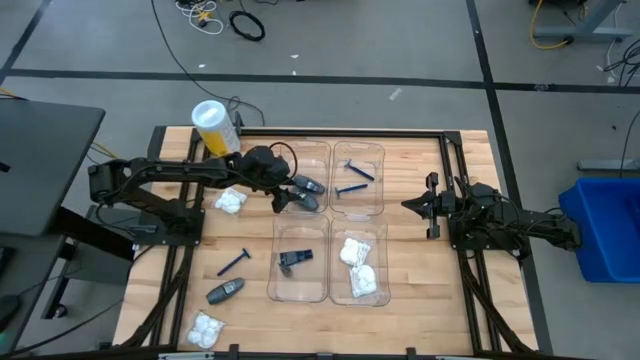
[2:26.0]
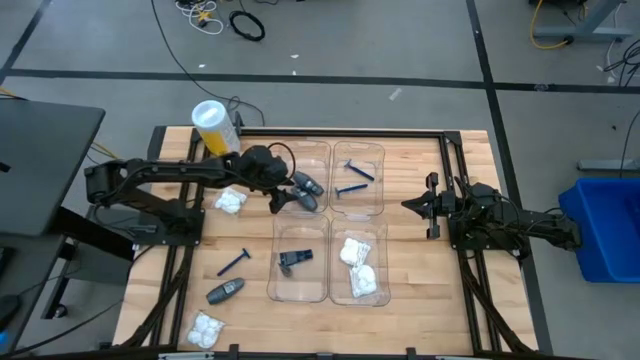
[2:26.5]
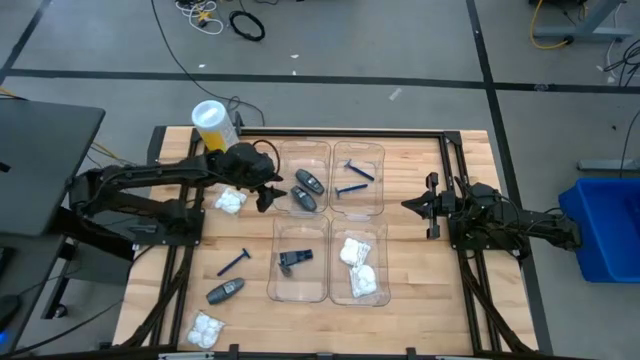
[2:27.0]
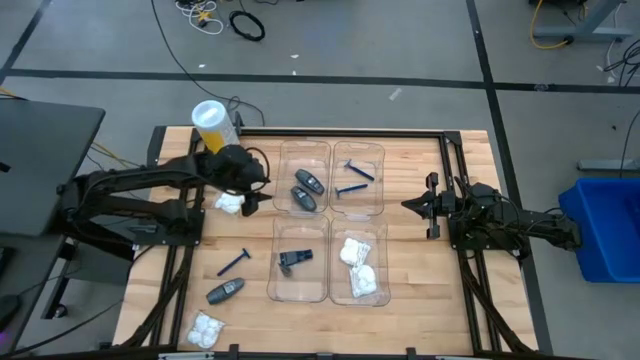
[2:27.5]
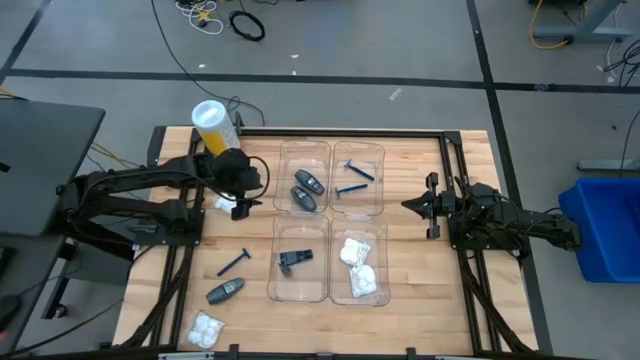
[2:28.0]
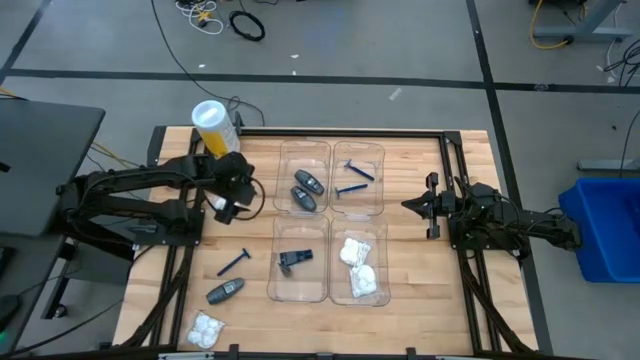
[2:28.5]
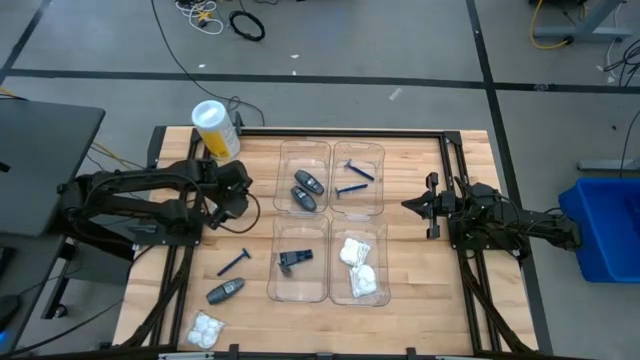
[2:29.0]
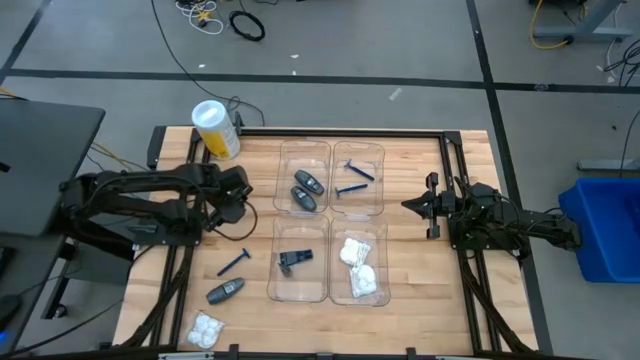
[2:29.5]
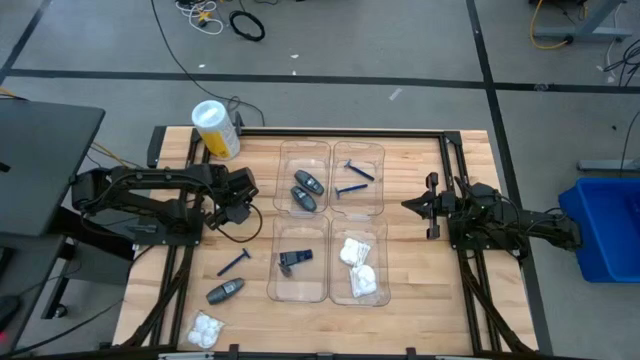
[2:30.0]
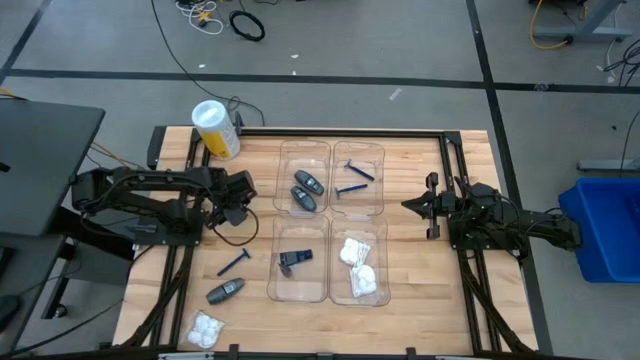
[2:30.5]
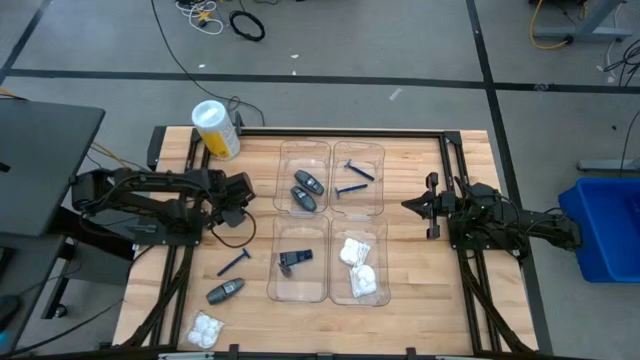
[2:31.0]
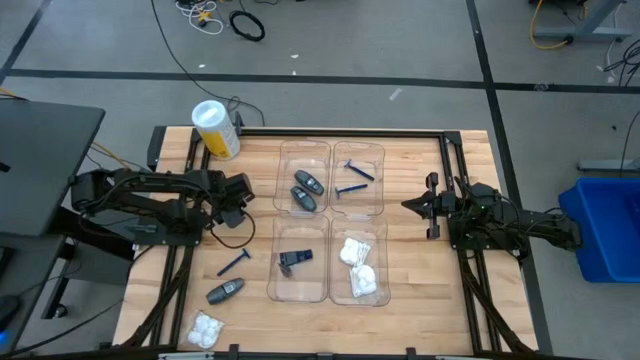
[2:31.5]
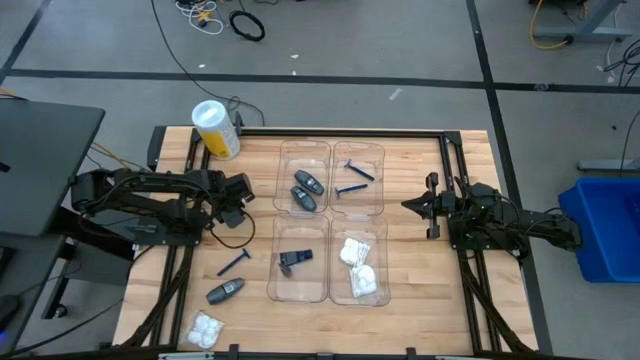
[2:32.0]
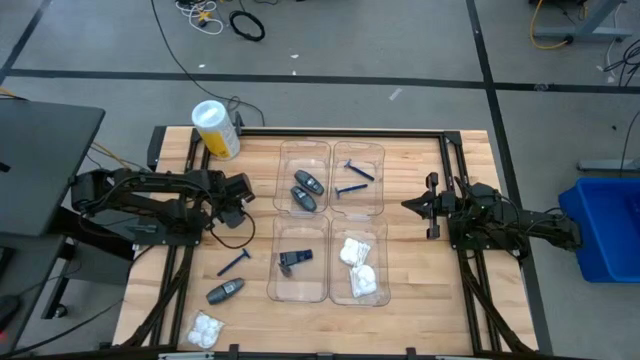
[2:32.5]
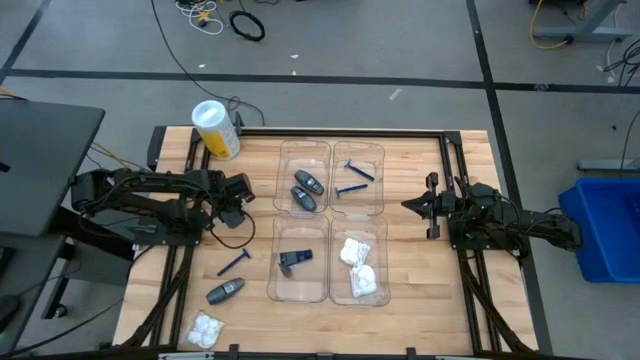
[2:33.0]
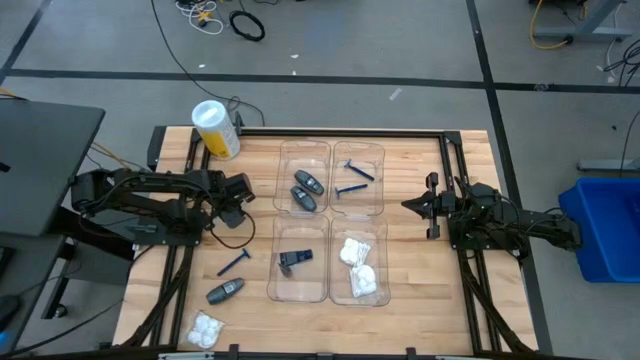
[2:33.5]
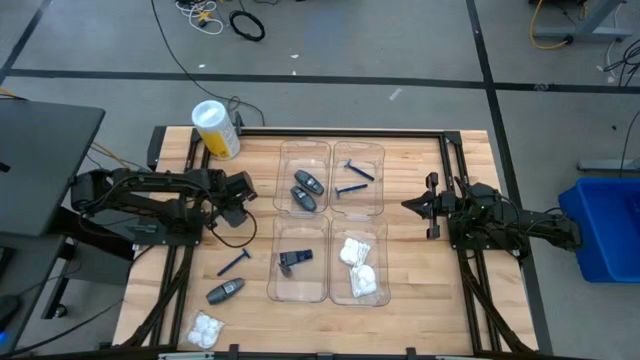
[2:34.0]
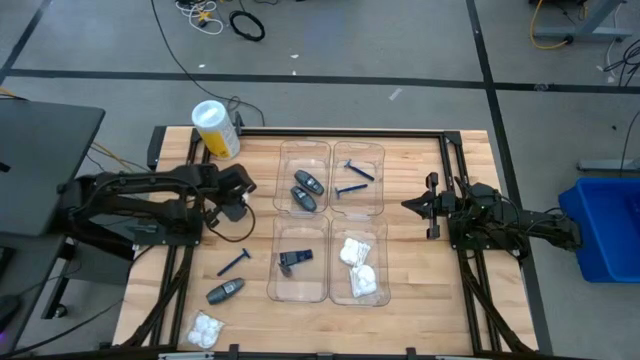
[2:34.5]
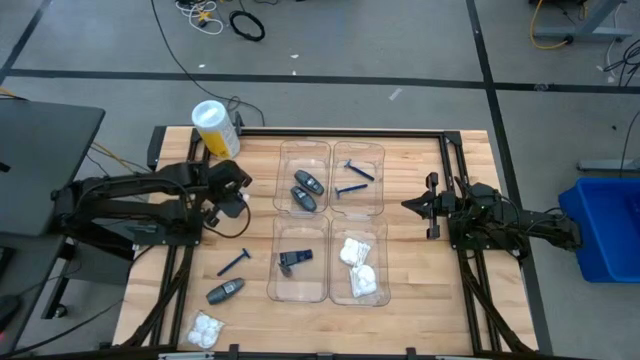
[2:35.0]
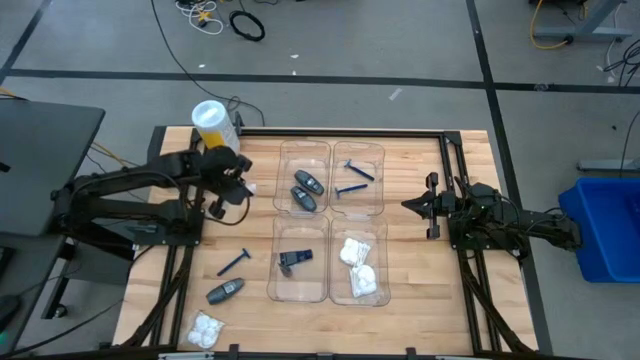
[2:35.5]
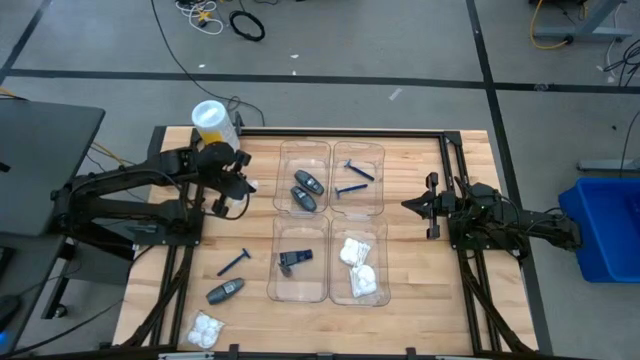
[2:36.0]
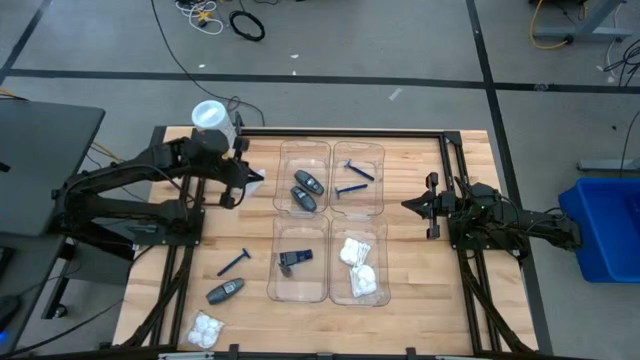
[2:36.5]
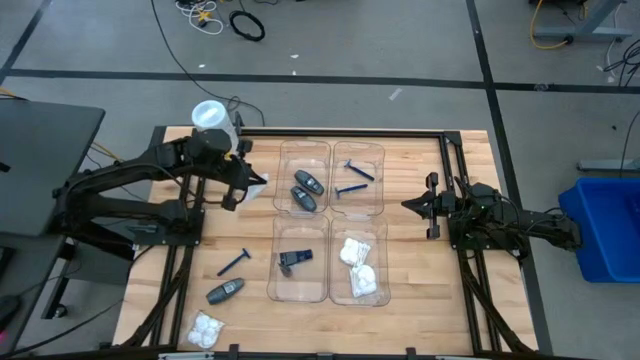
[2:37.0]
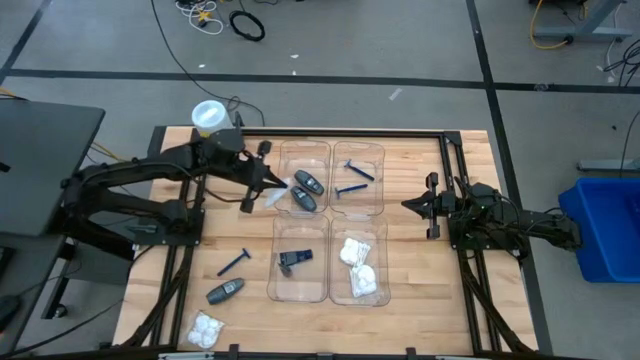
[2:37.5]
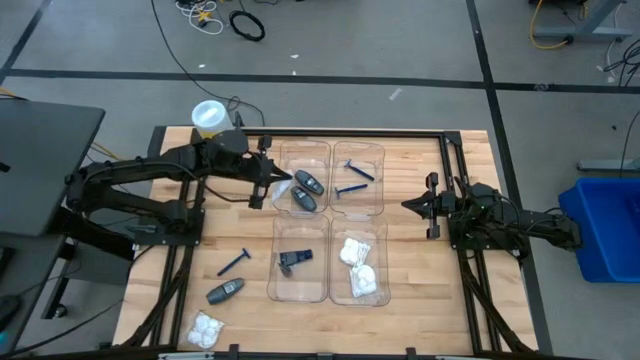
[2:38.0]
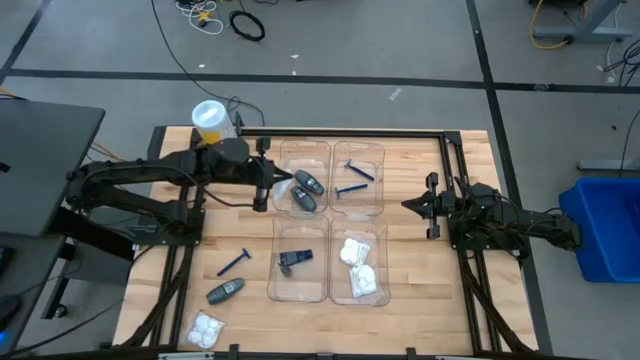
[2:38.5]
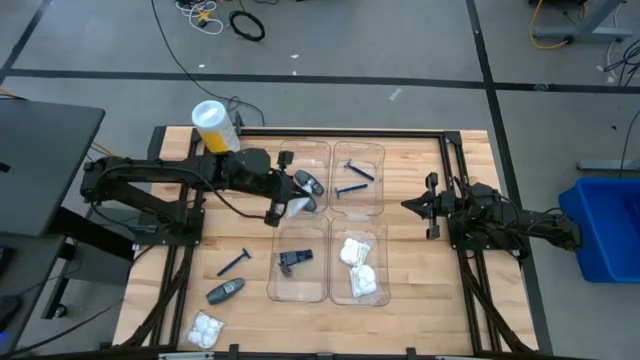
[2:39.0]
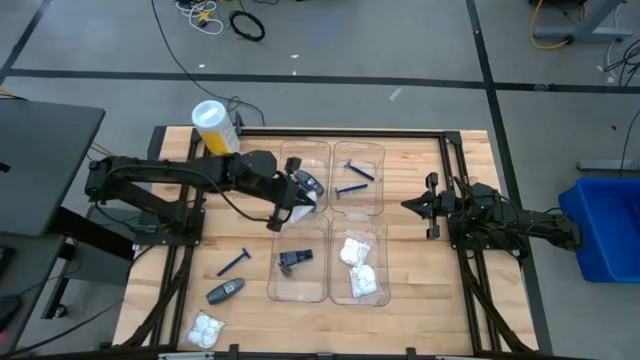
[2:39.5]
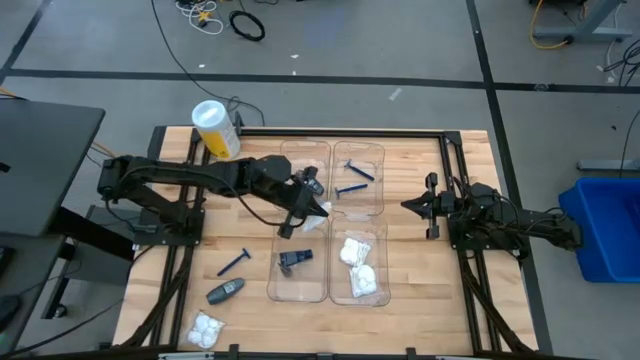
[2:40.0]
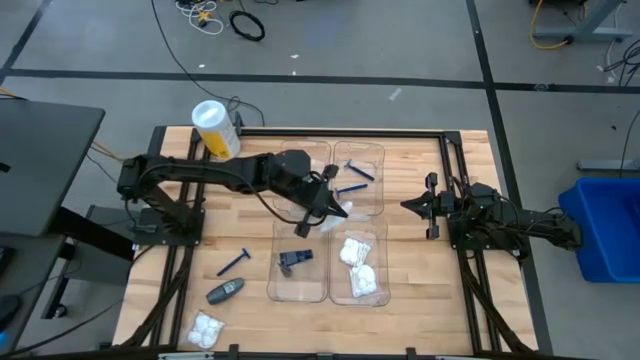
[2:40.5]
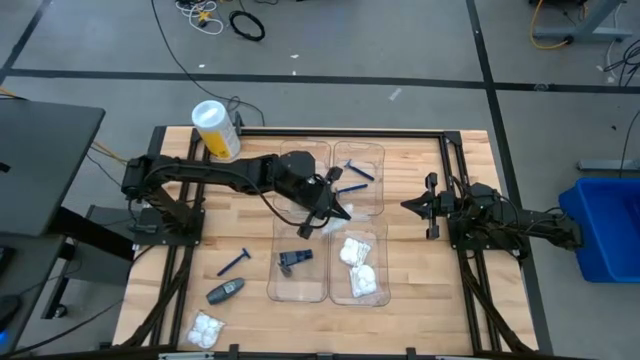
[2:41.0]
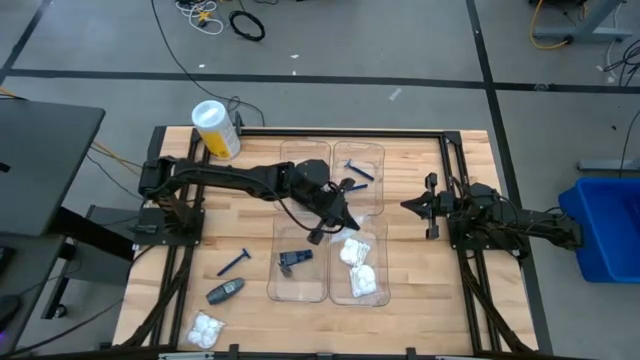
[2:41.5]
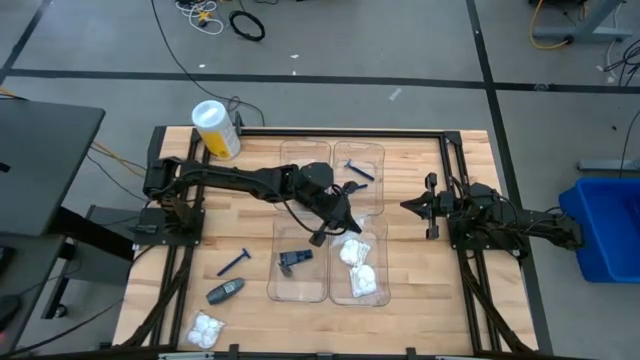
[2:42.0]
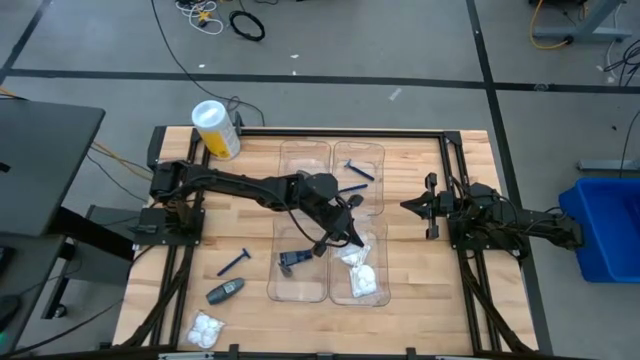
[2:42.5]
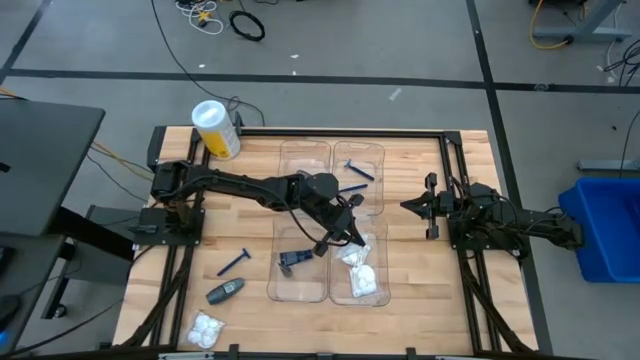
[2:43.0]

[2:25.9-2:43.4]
Task: Pick & Place Travel size toiletries
Put the cotton pack into the bottom right transparent bin

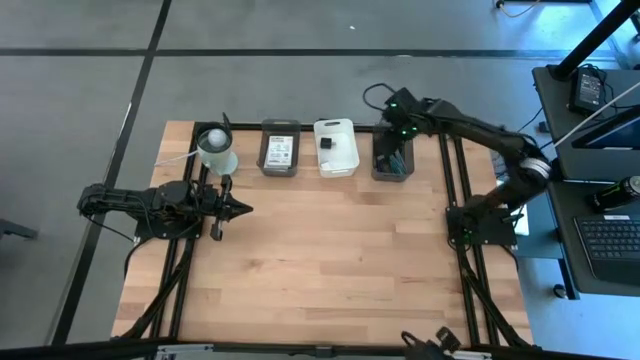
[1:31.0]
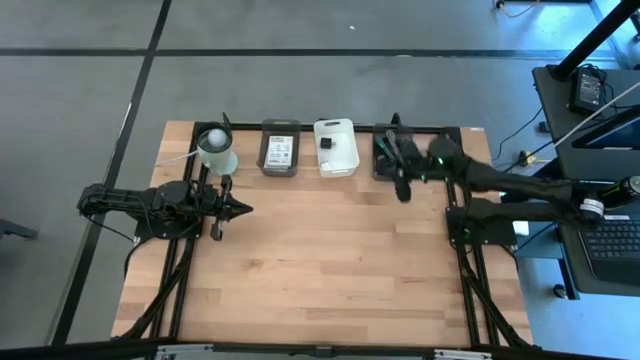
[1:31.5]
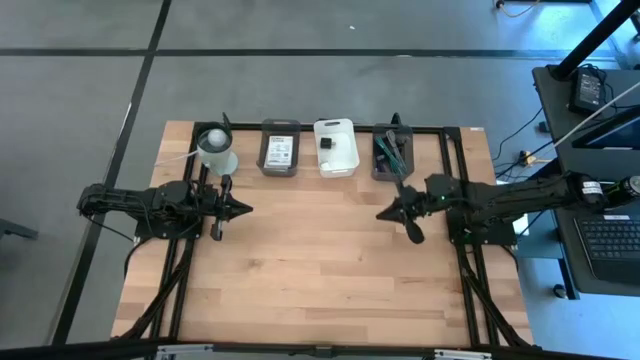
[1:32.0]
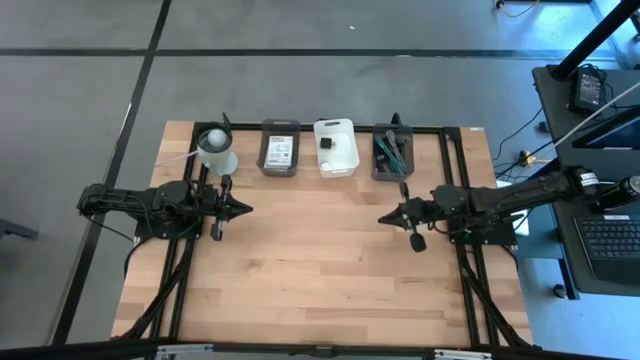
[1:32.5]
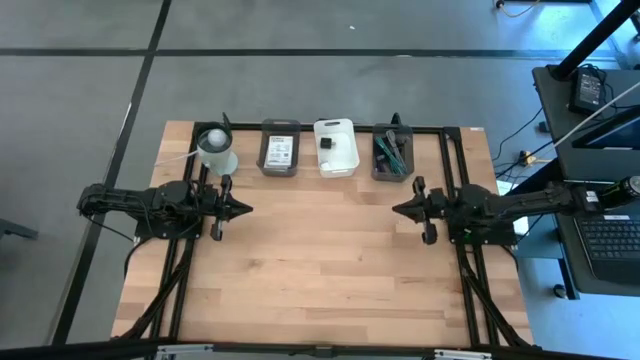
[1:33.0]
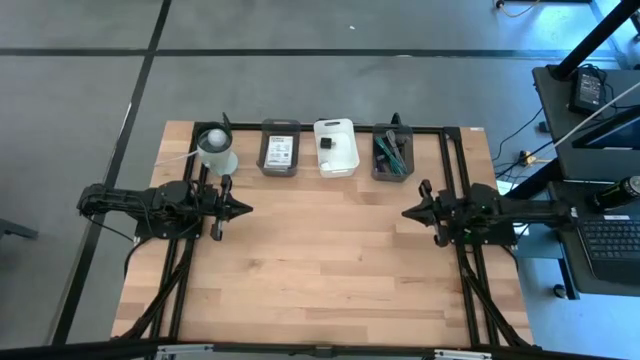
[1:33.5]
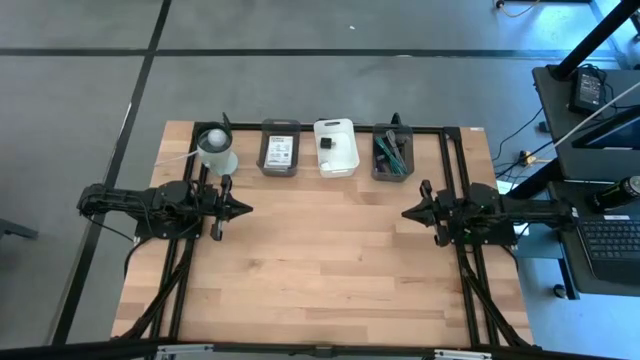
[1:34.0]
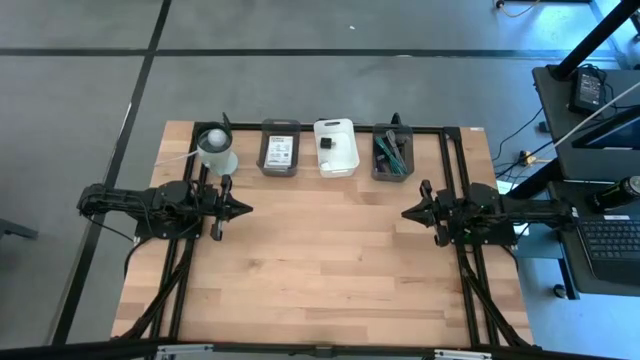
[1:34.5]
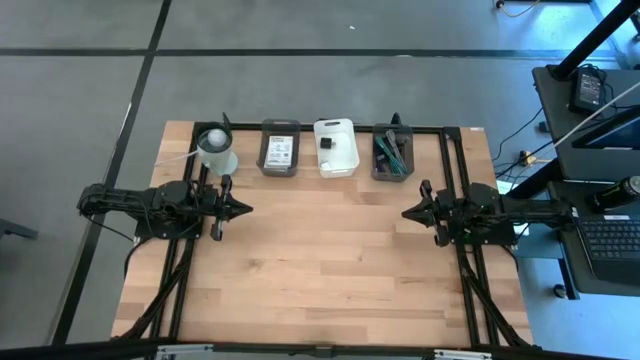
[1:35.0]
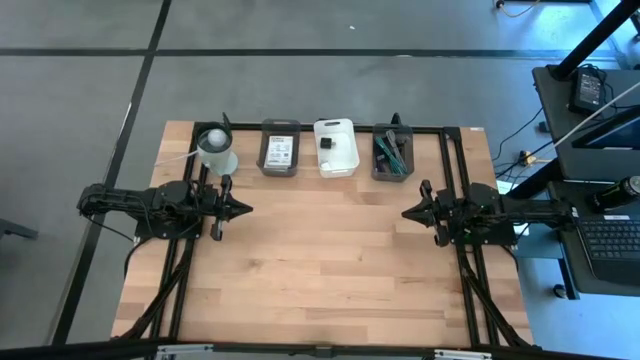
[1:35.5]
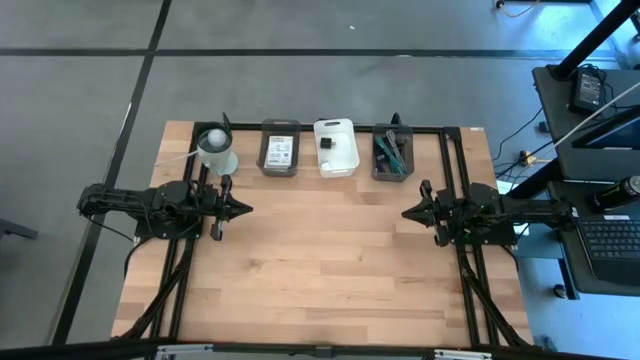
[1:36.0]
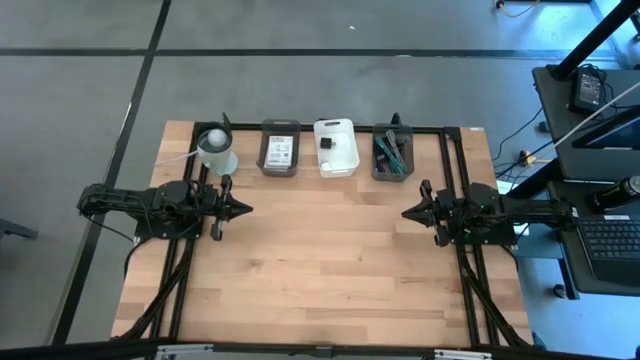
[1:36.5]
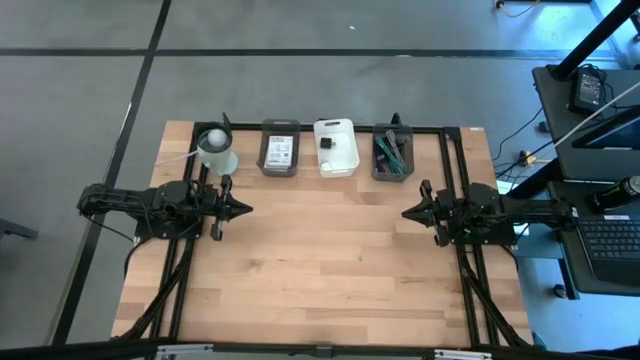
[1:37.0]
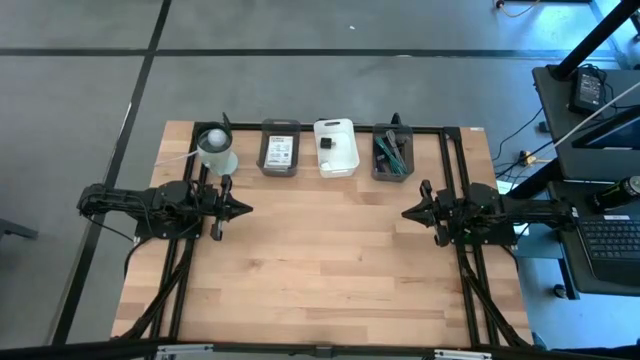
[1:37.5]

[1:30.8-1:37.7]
Task: Pick and place items into bin
Return to Home Position
